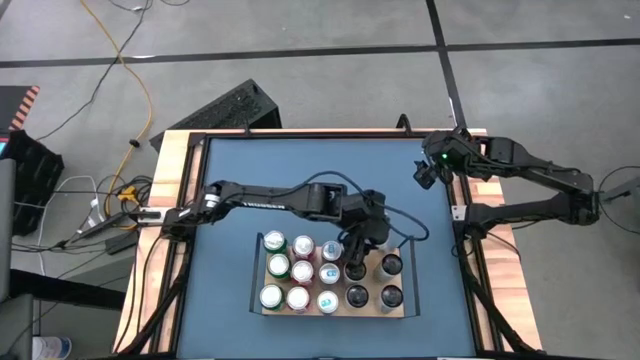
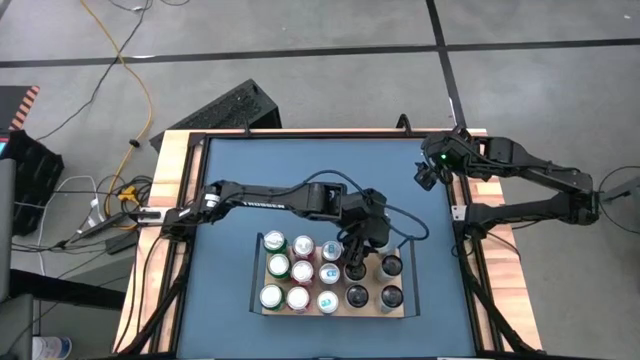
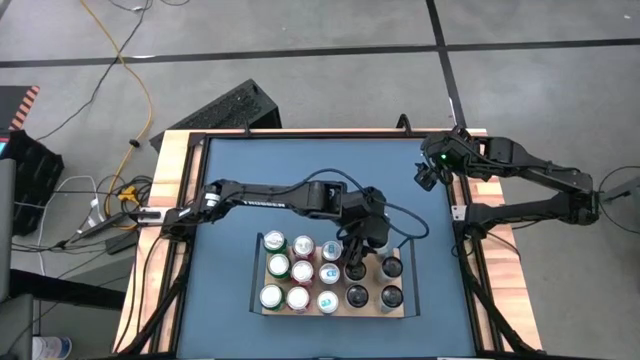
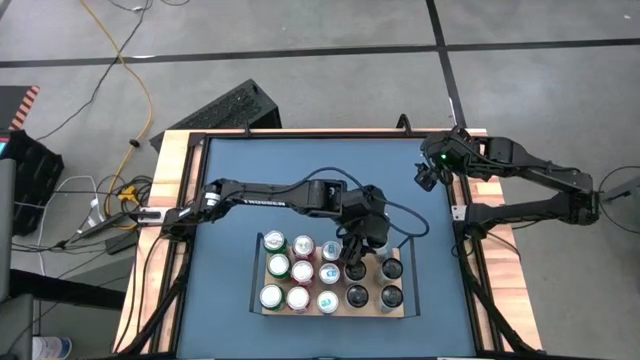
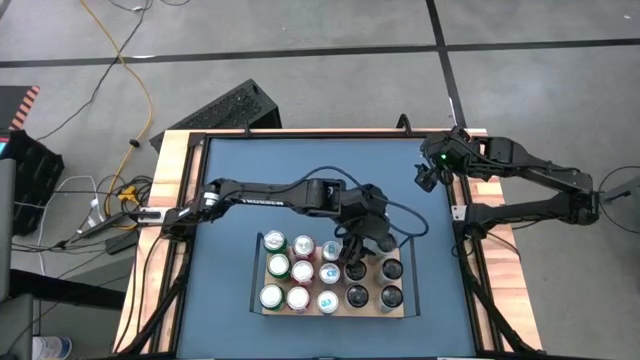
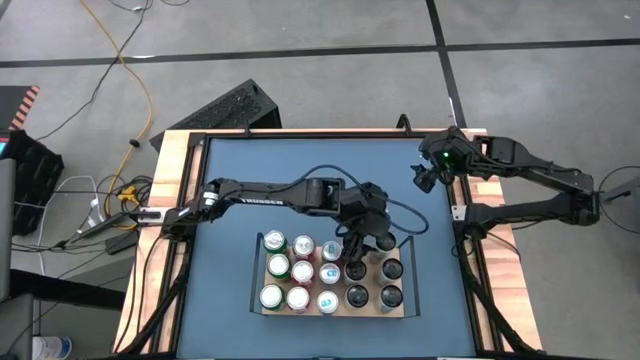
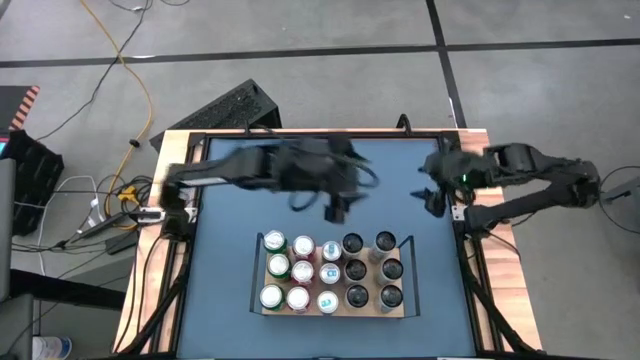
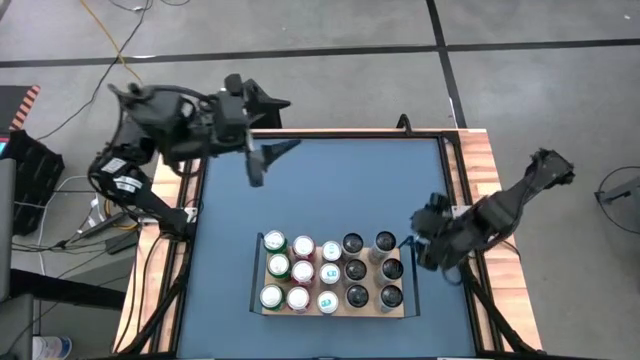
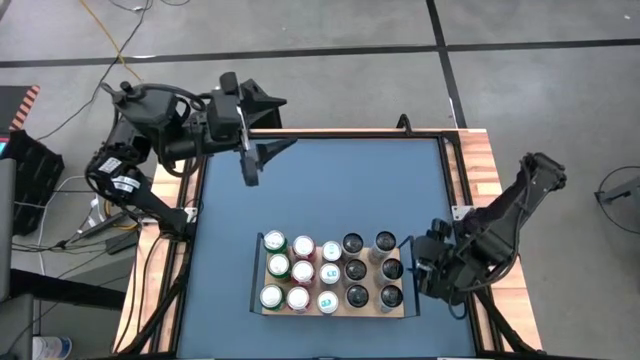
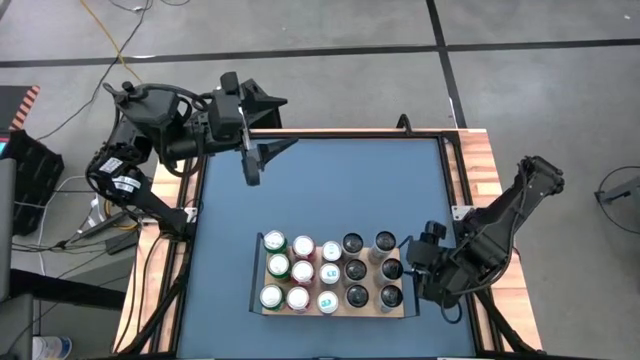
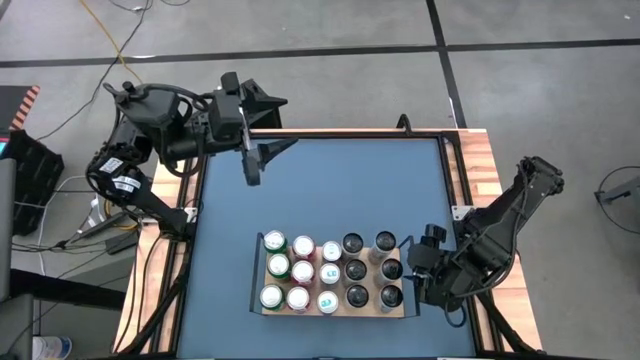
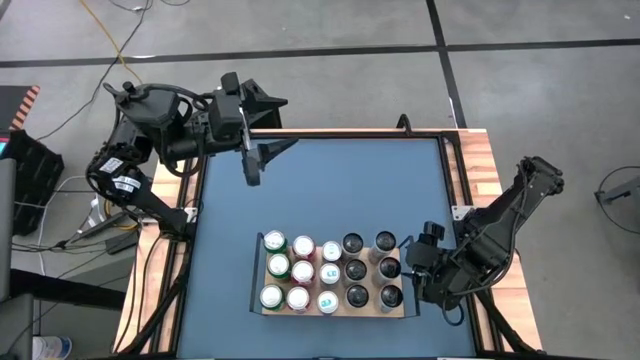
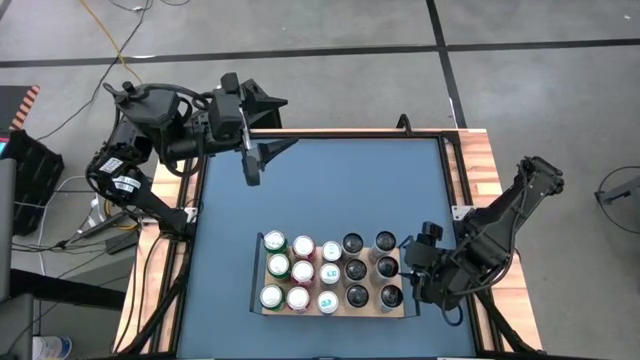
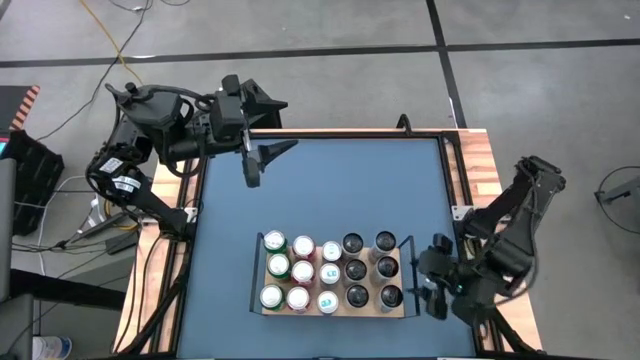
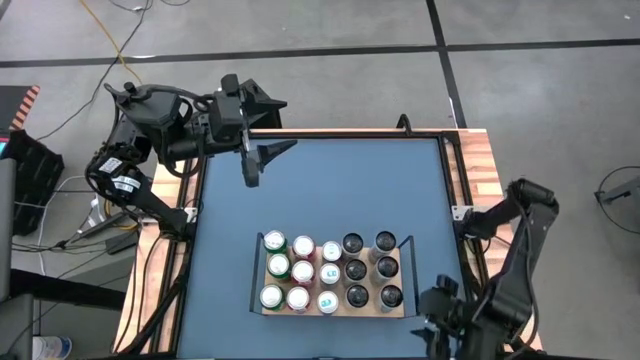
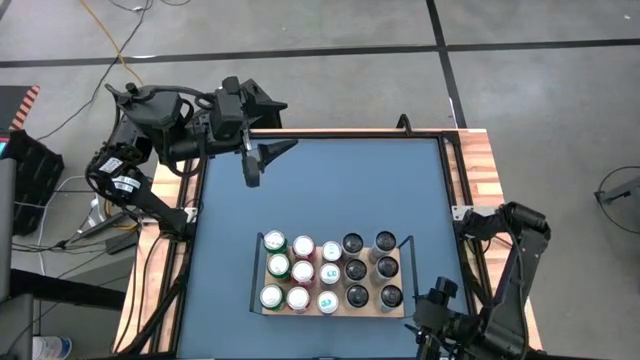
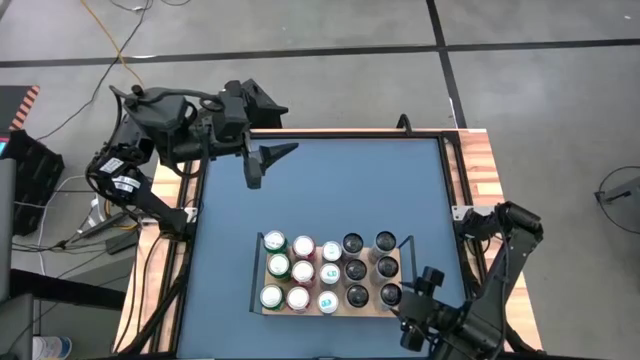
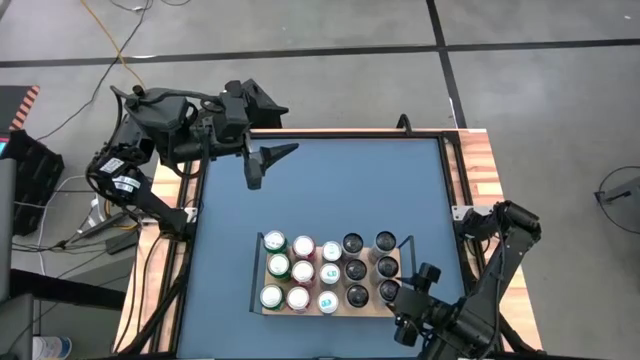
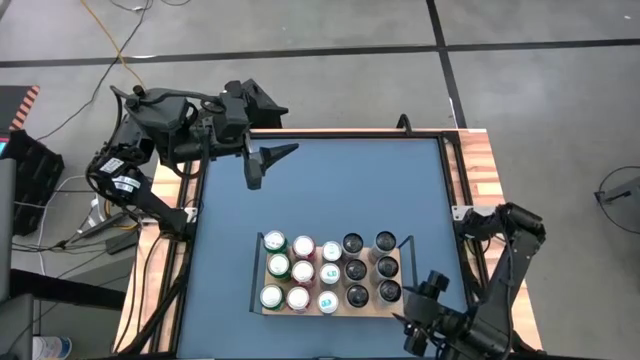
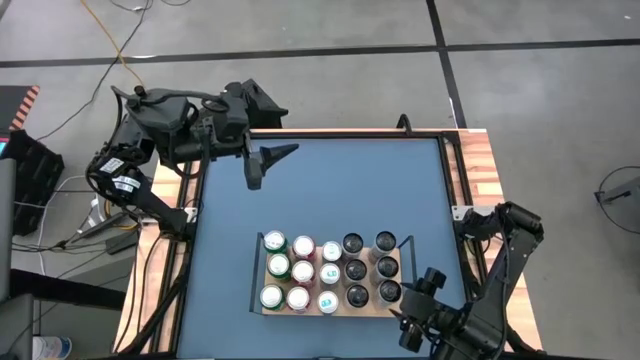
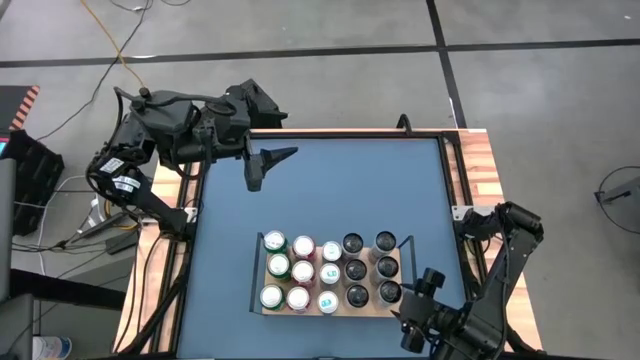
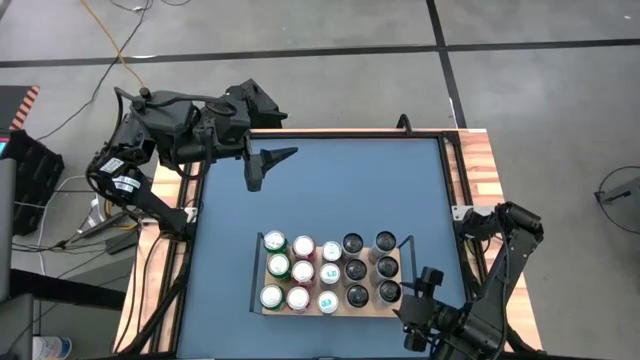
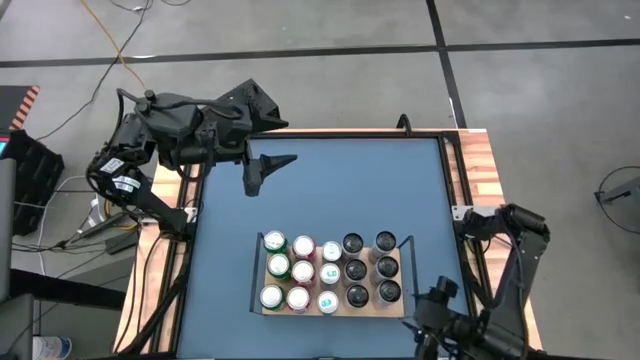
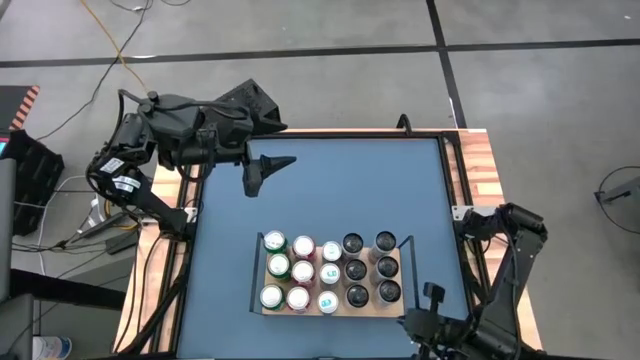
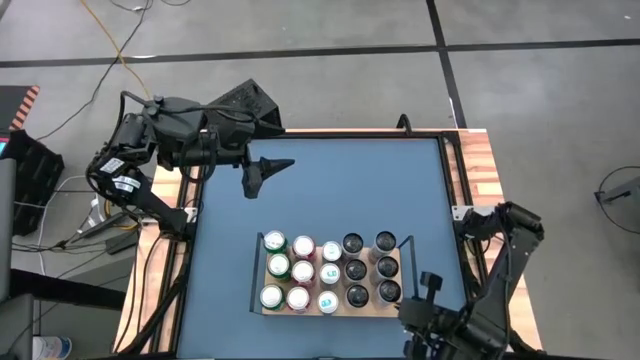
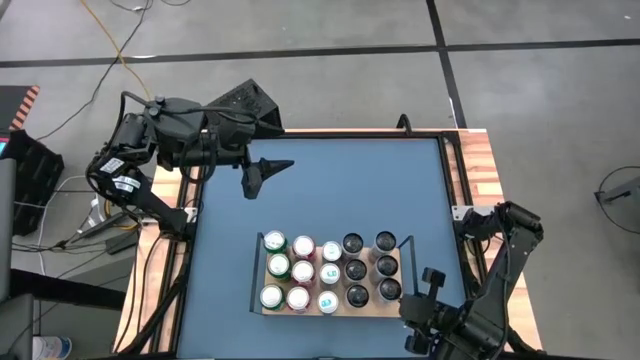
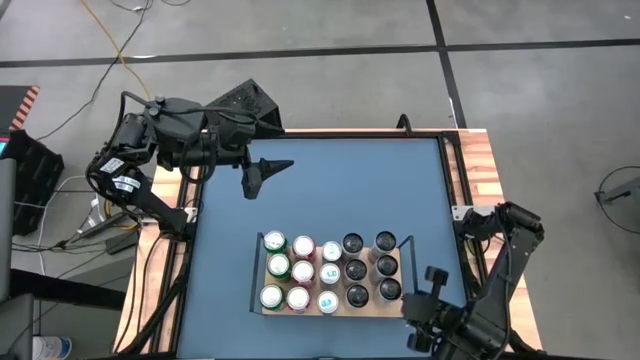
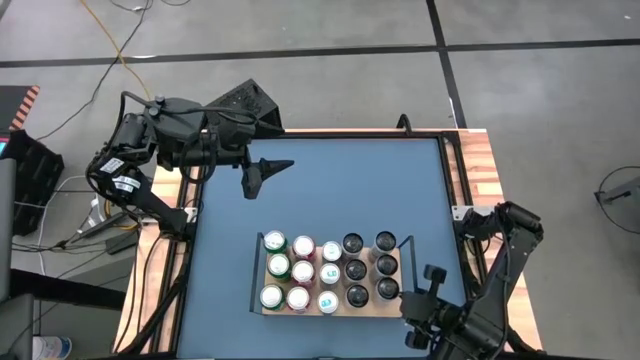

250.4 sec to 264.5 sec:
Task: Place canned beverage on shelf
Put the white-blue soda can on the shelf aligned with the other white-blue soda cans

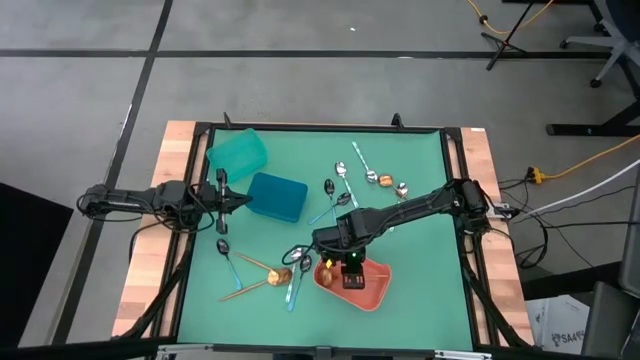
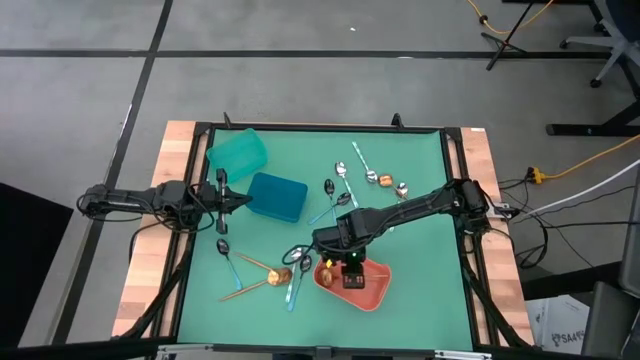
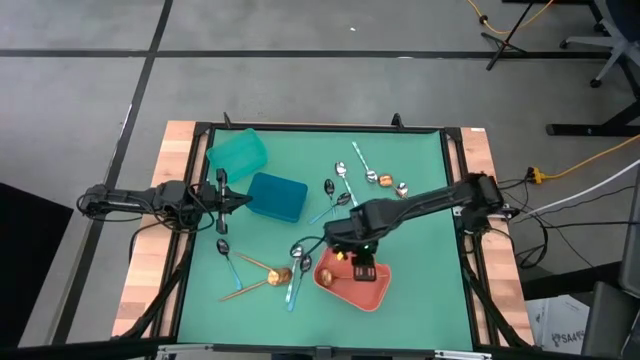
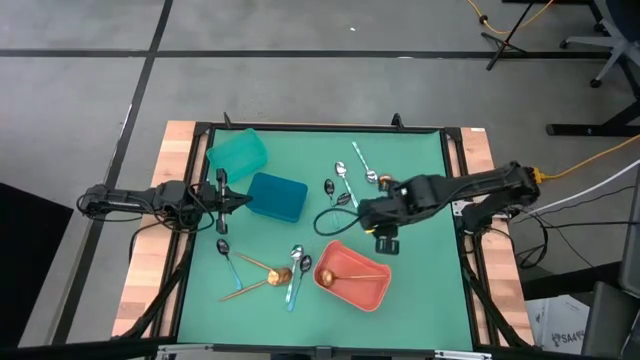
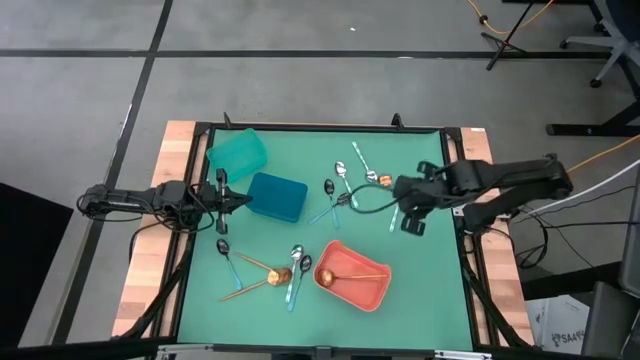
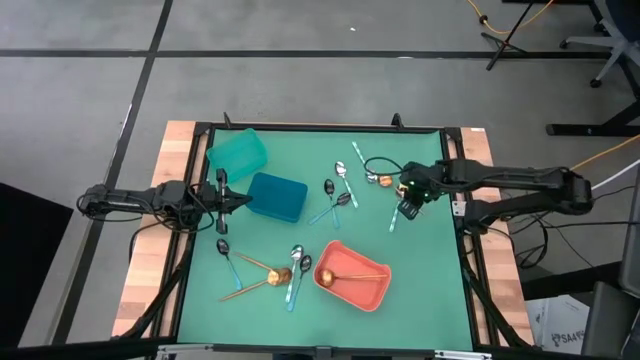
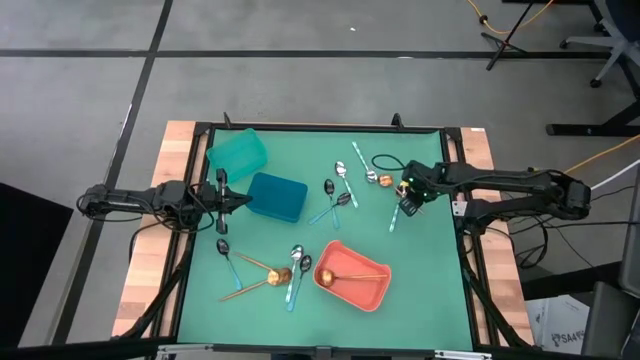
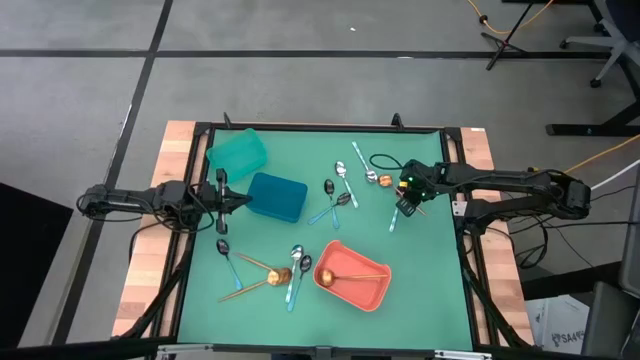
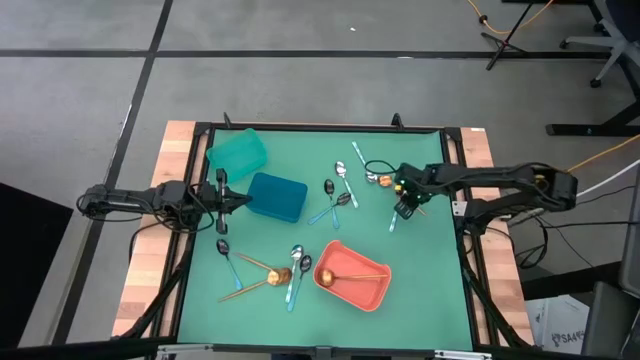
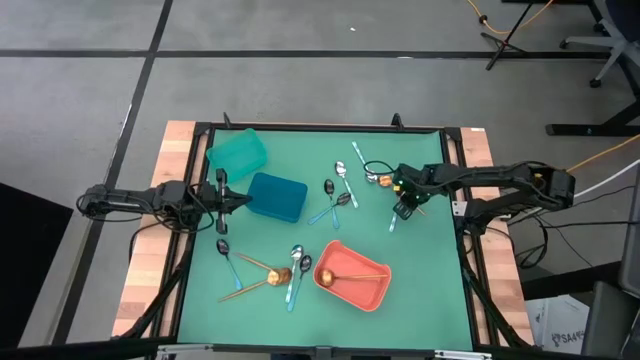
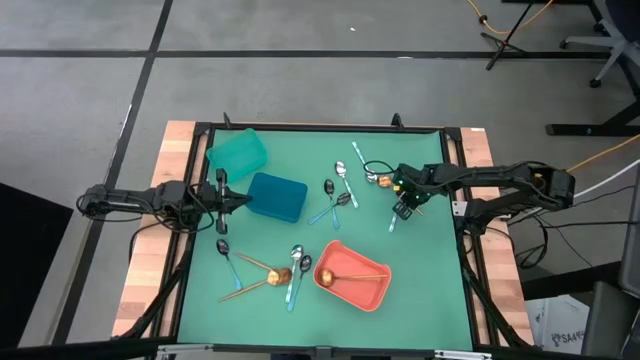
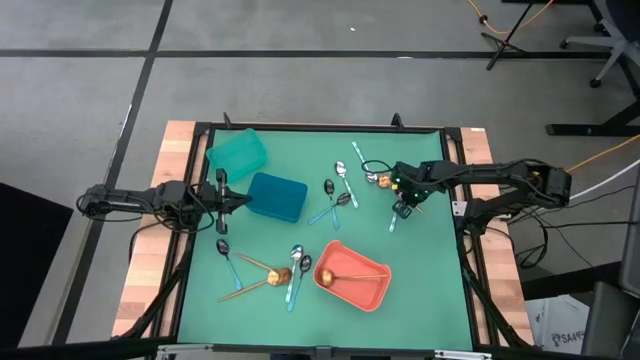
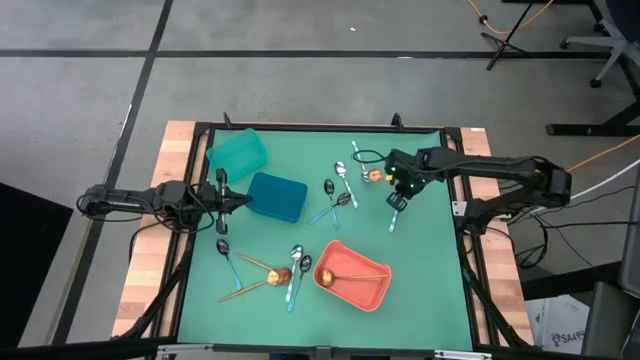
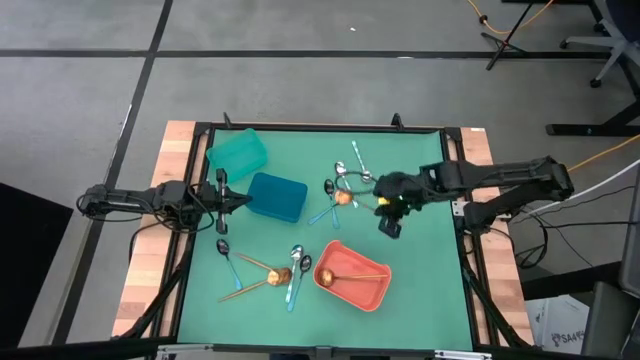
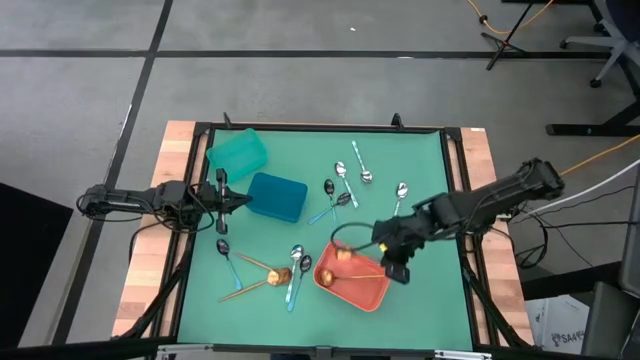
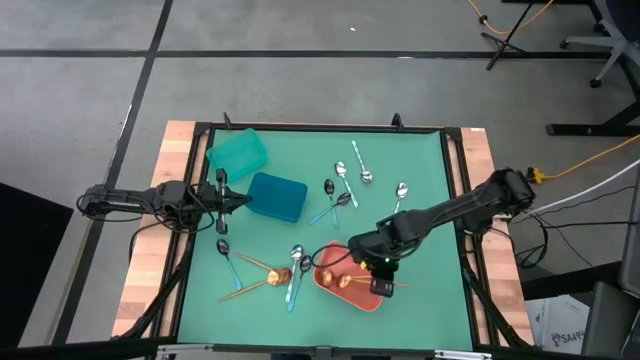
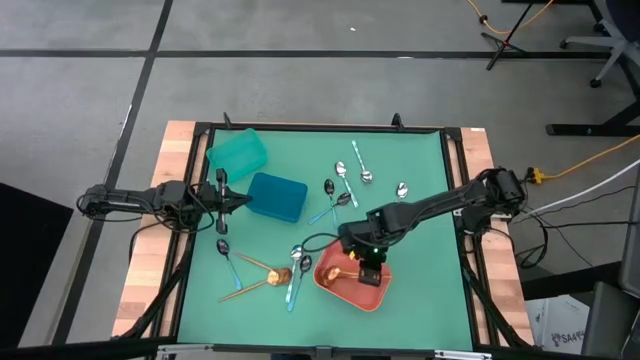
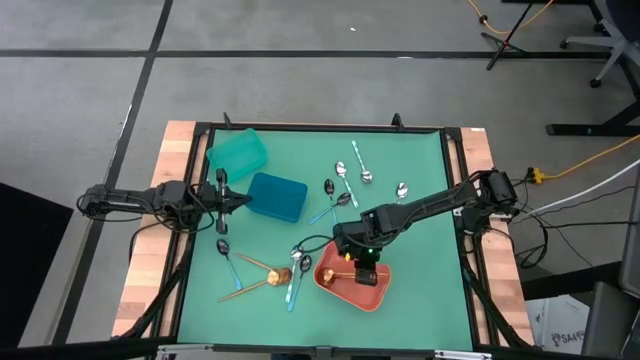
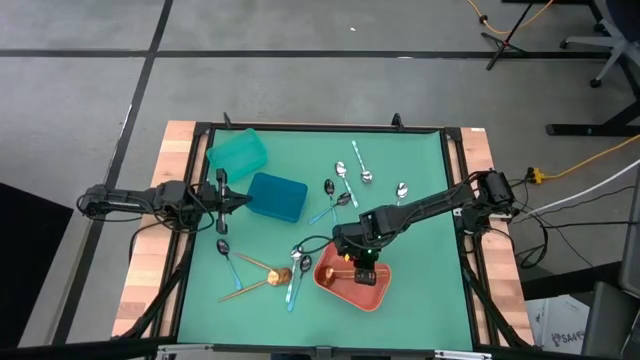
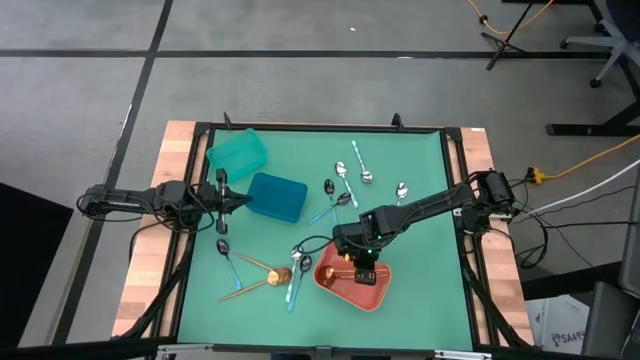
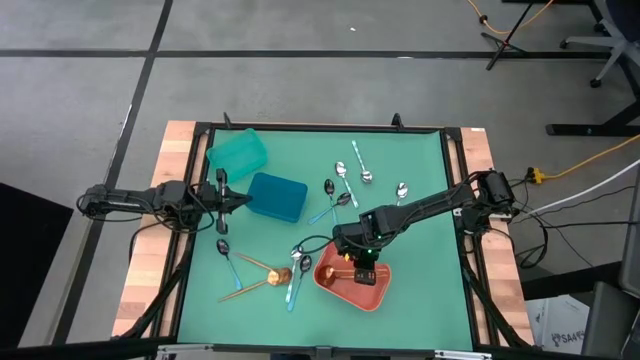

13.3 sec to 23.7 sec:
Task: Sort silverware by color (type)
Put the yellow spoon into the orange bin
